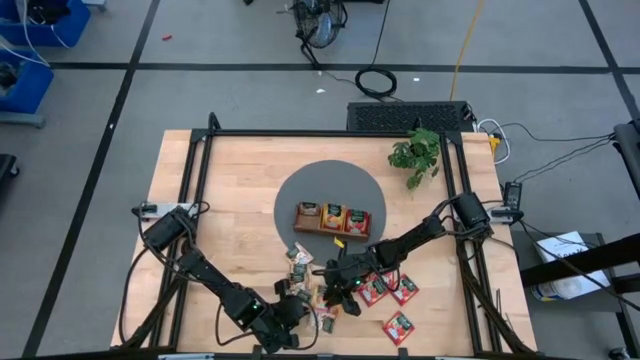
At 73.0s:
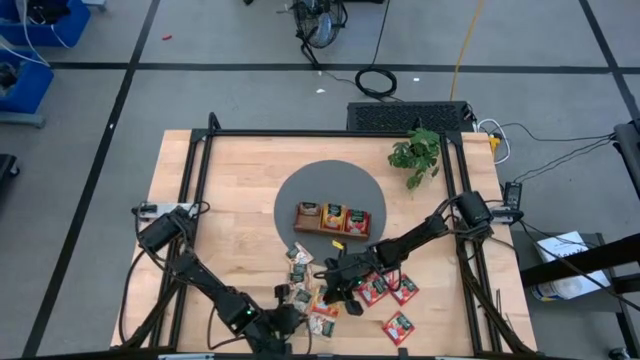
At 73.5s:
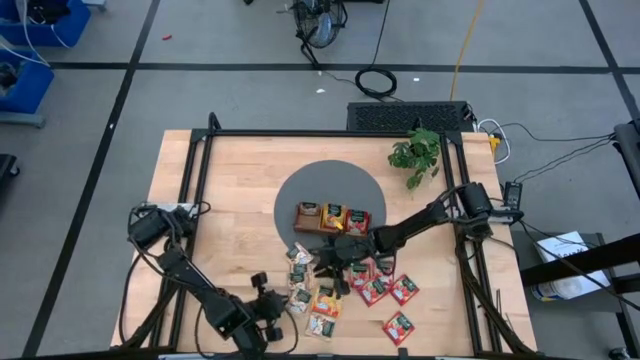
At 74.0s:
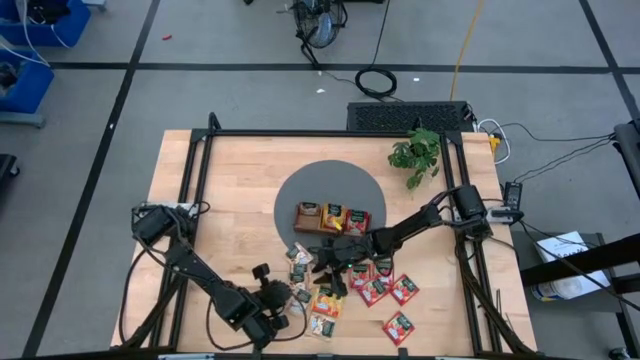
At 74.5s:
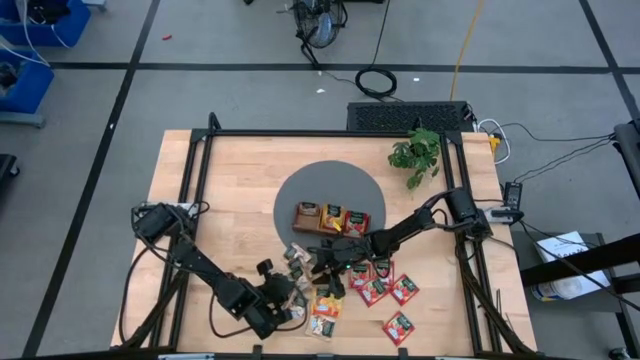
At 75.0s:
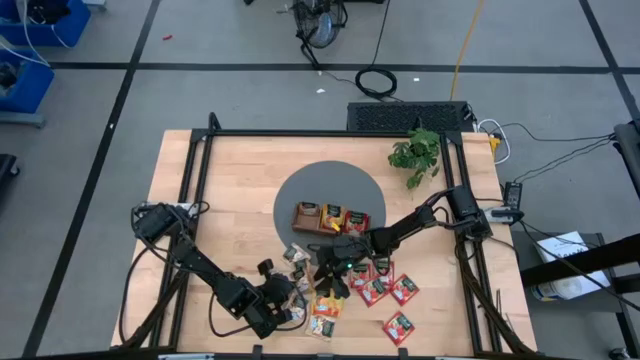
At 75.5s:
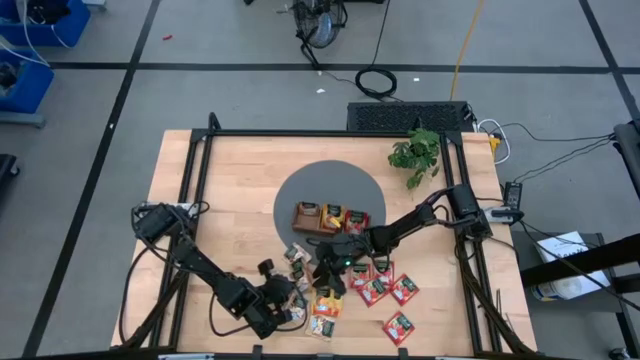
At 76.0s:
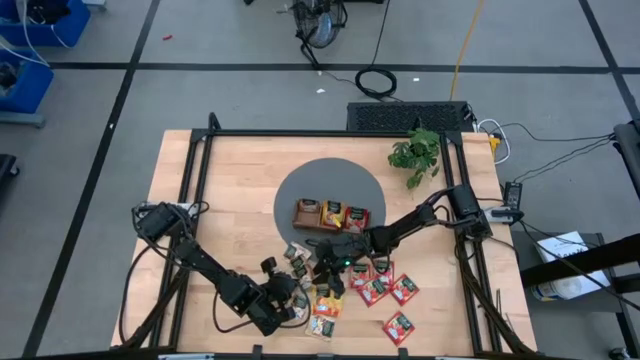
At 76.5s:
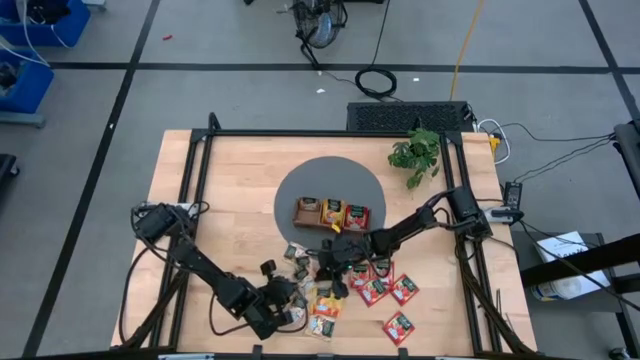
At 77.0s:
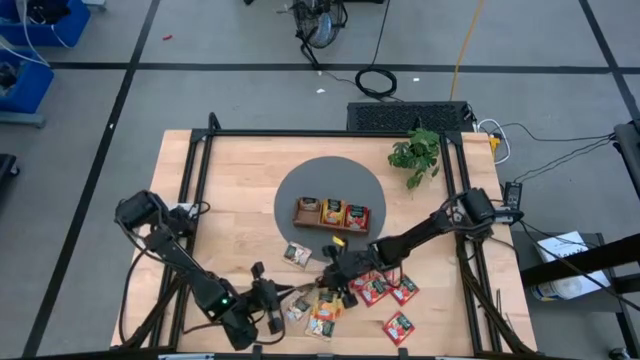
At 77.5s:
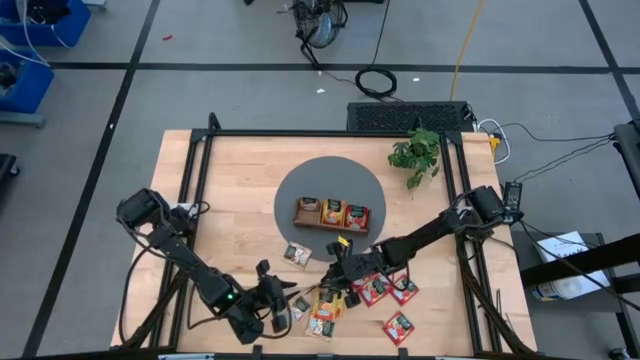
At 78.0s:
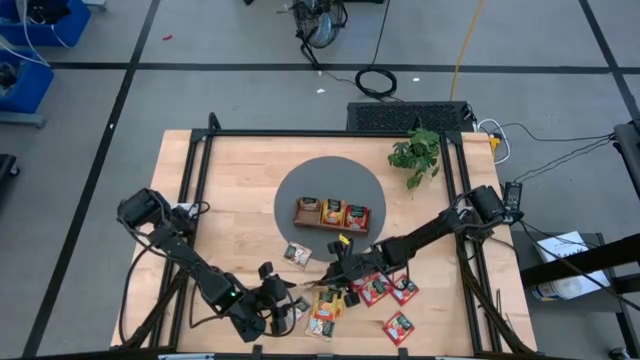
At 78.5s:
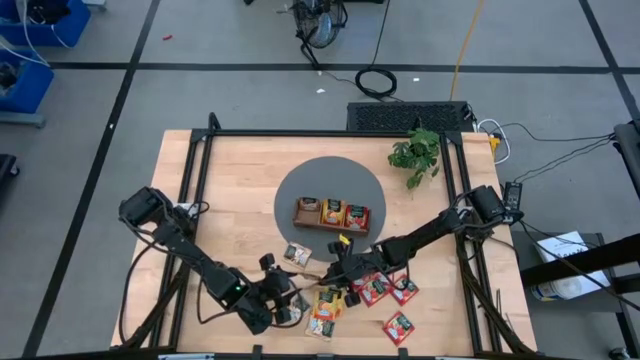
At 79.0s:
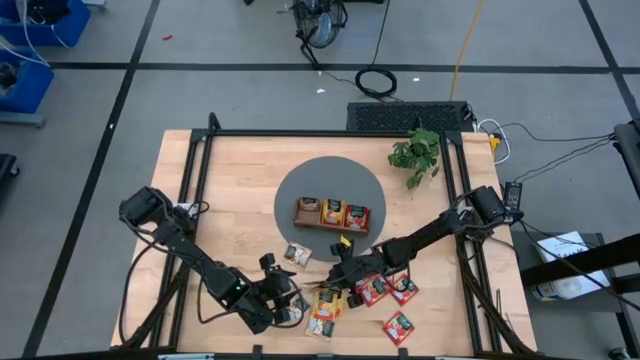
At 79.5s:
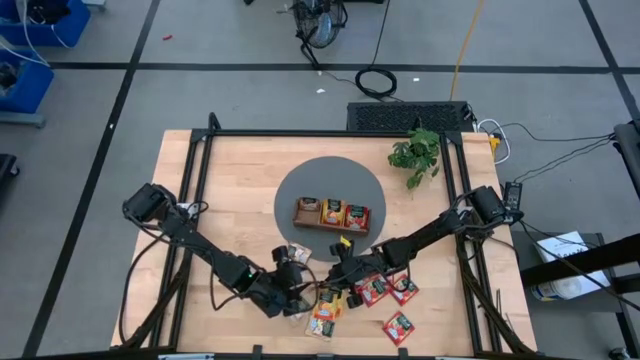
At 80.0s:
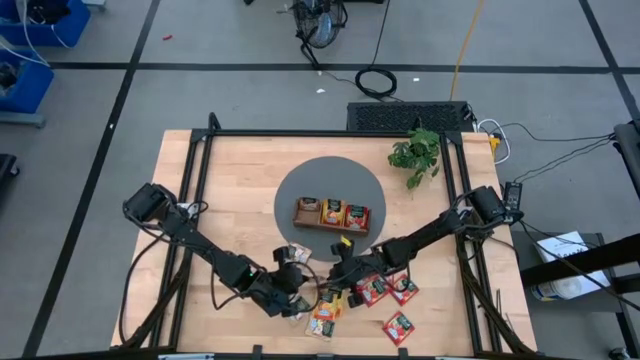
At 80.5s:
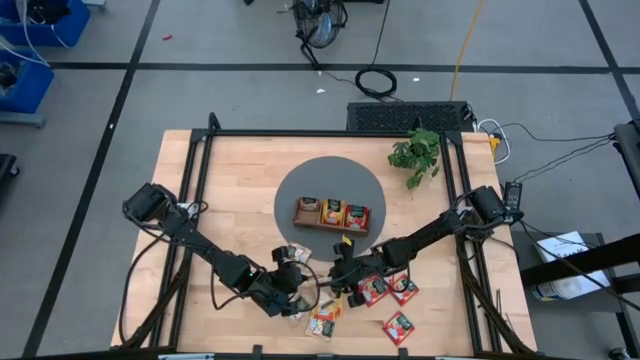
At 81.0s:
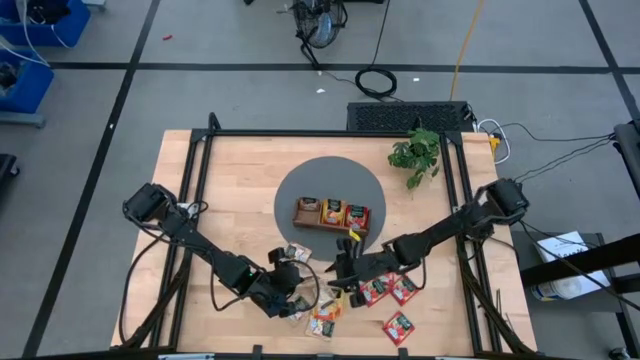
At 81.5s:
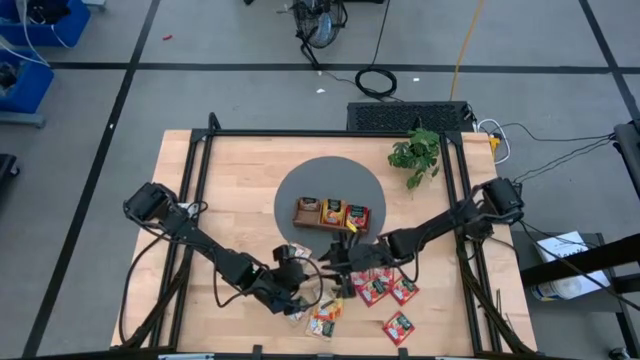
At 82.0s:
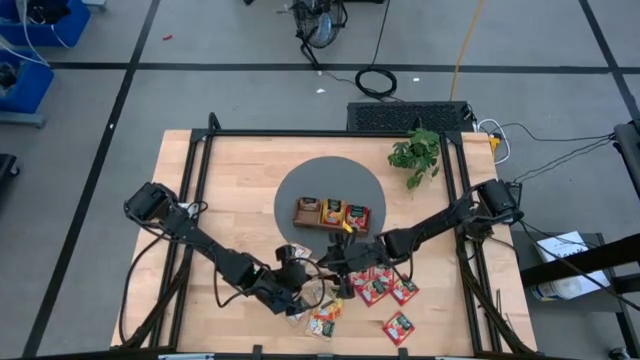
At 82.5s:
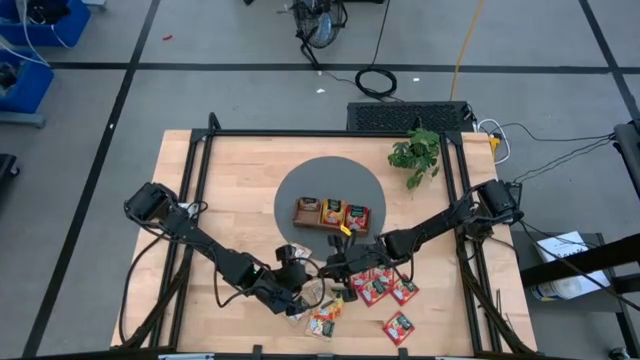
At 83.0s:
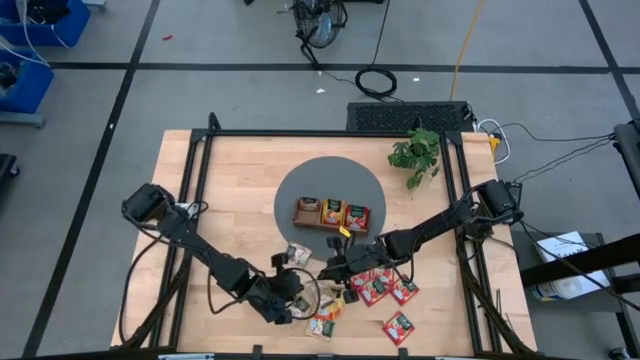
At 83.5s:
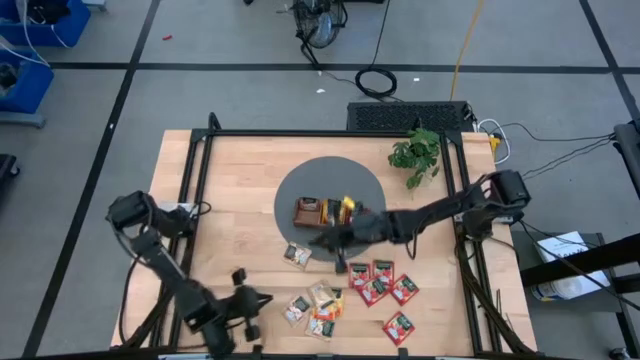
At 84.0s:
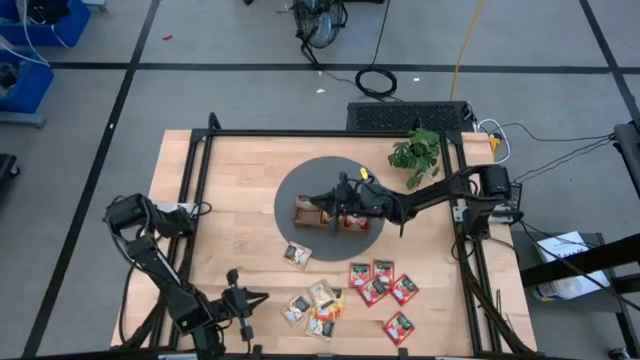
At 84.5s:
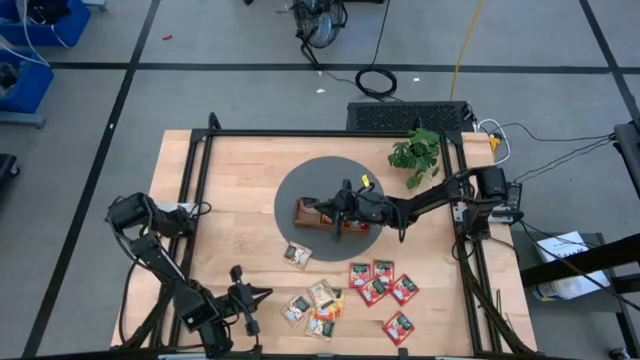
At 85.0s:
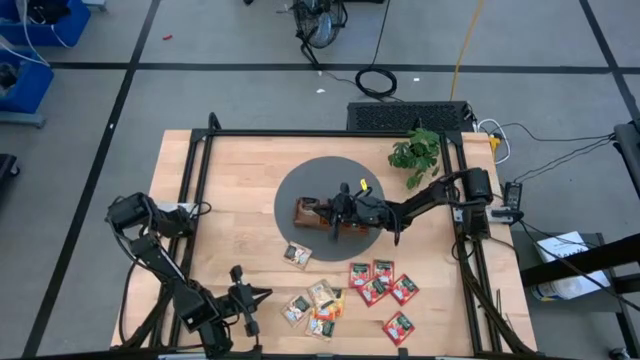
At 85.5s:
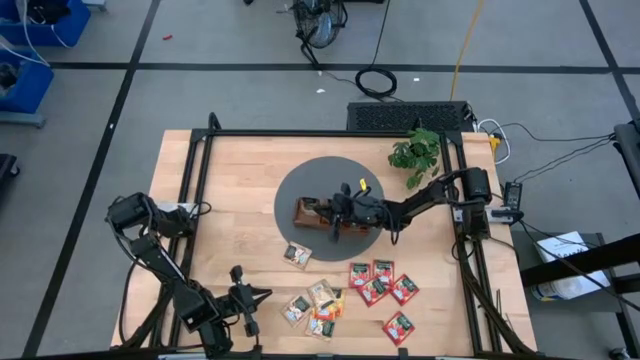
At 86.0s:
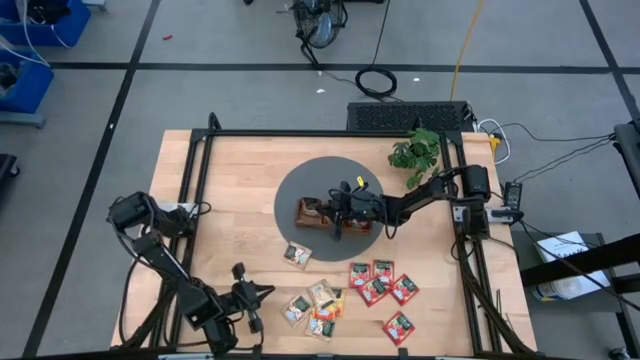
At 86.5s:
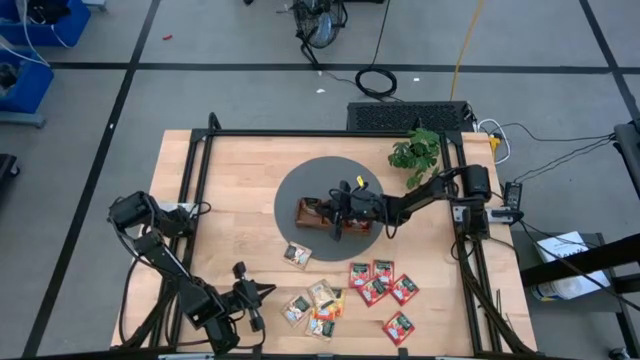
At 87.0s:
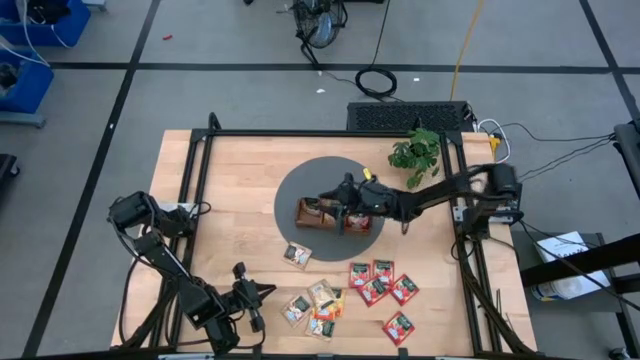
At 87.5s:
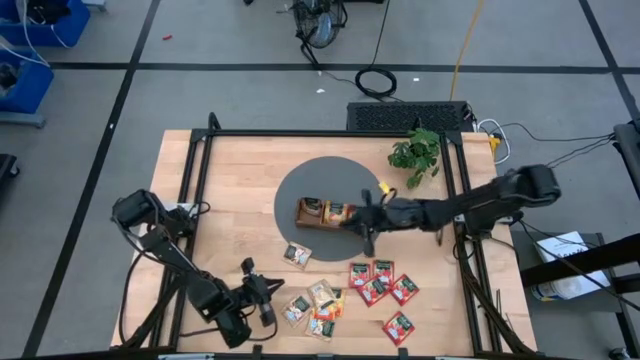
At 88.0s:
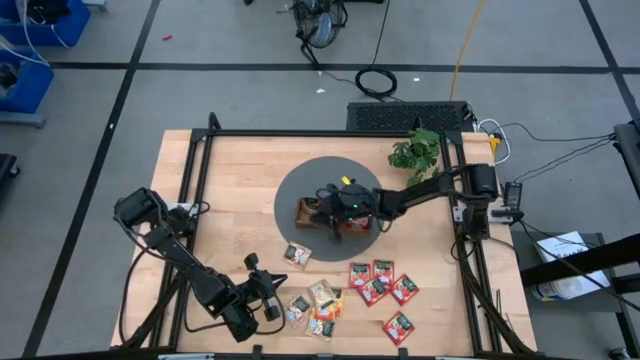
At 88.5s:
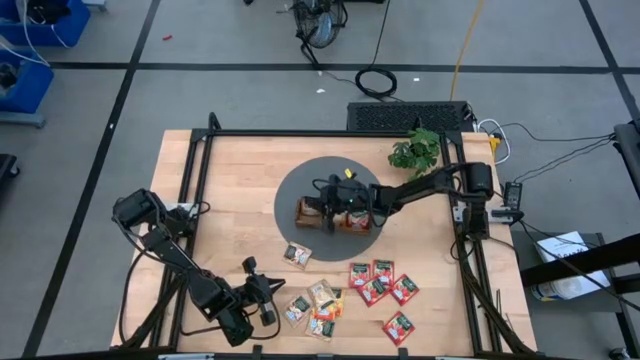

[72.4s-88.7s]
Task: Pick & Place Tea
Put the brown tea bag into the left section of the wooden organizer

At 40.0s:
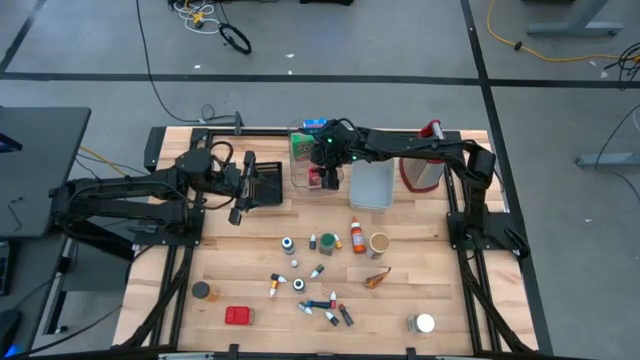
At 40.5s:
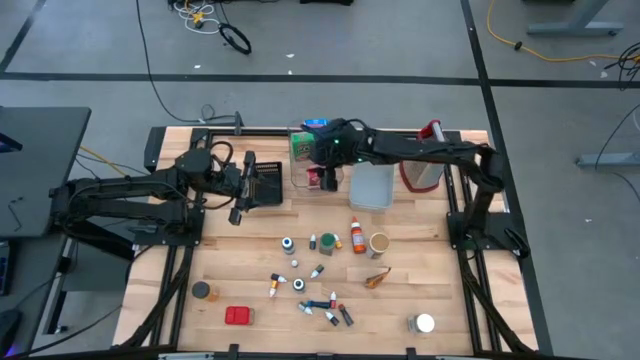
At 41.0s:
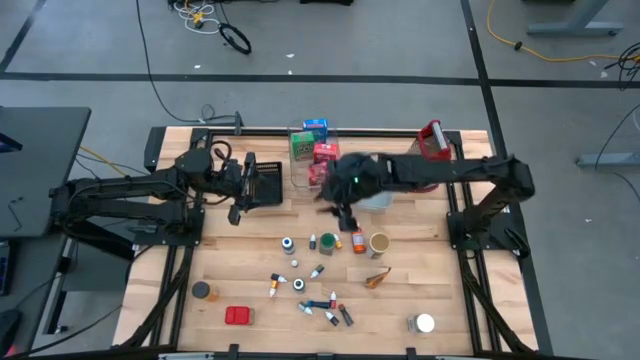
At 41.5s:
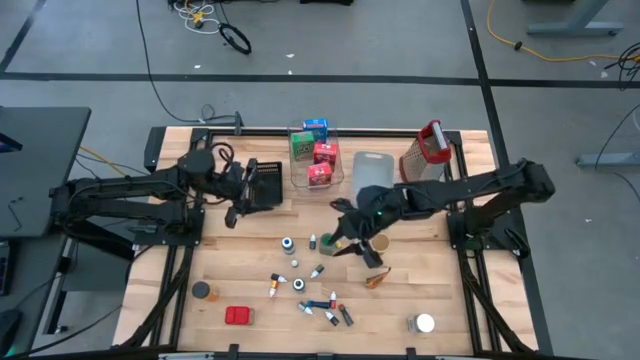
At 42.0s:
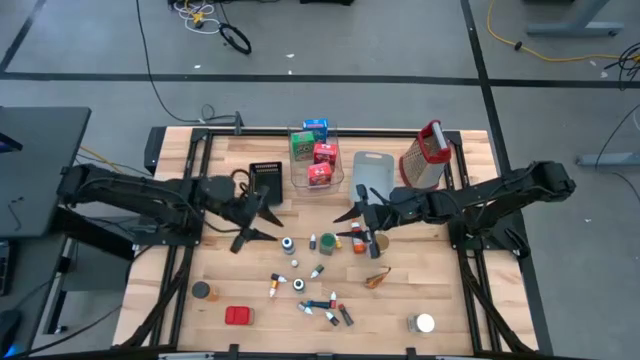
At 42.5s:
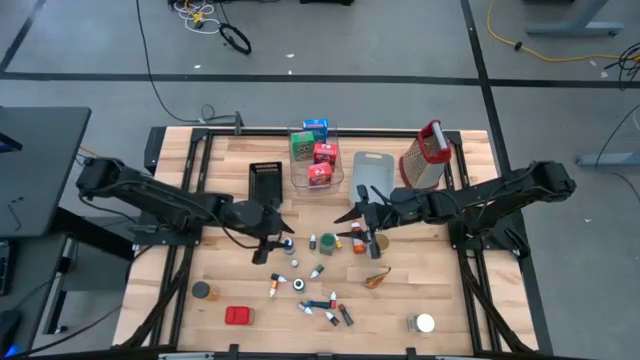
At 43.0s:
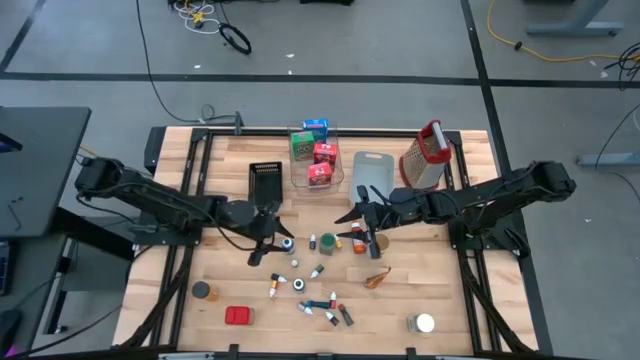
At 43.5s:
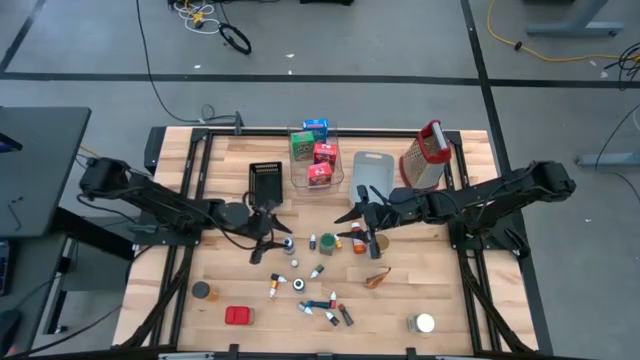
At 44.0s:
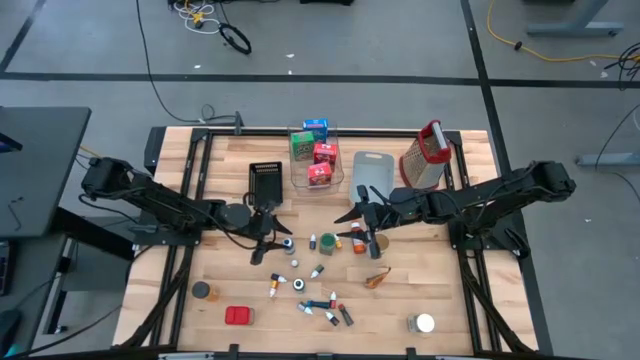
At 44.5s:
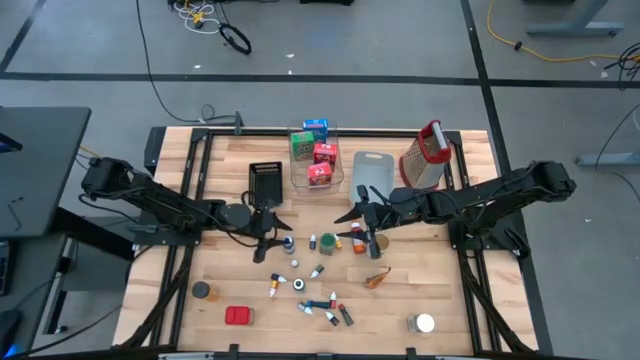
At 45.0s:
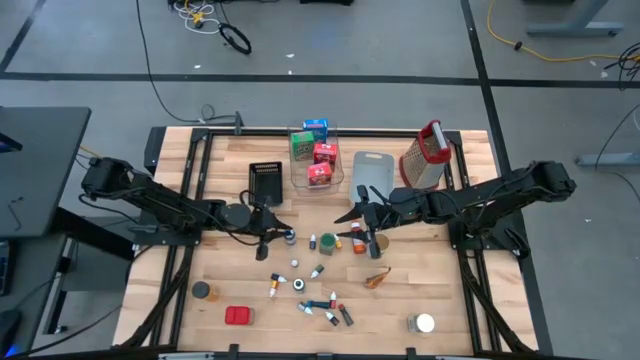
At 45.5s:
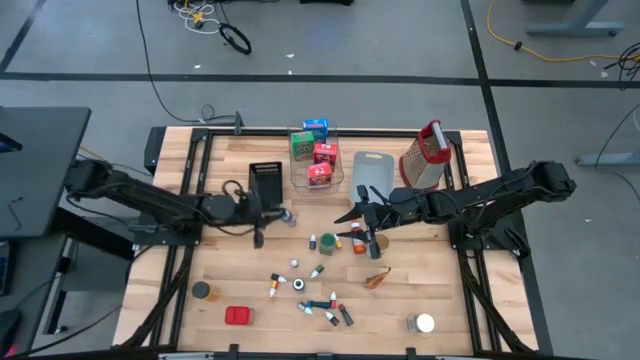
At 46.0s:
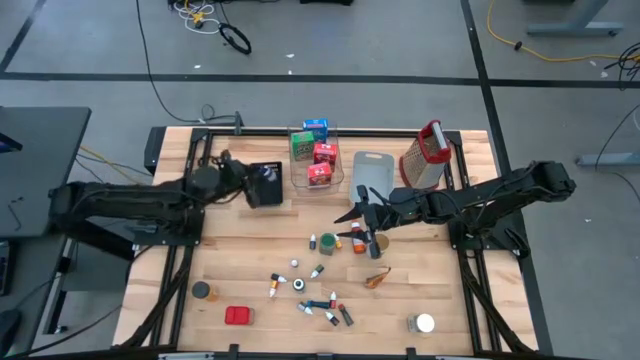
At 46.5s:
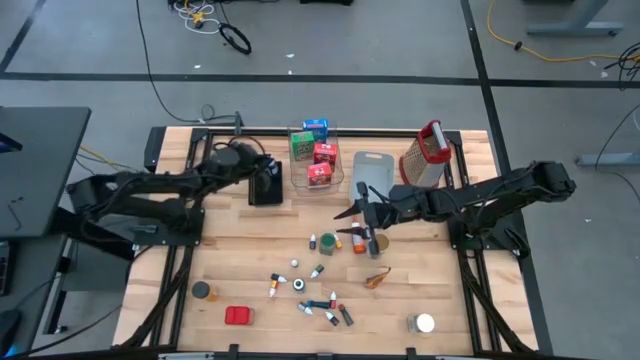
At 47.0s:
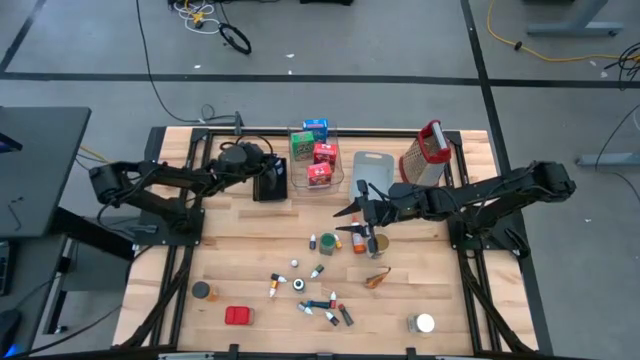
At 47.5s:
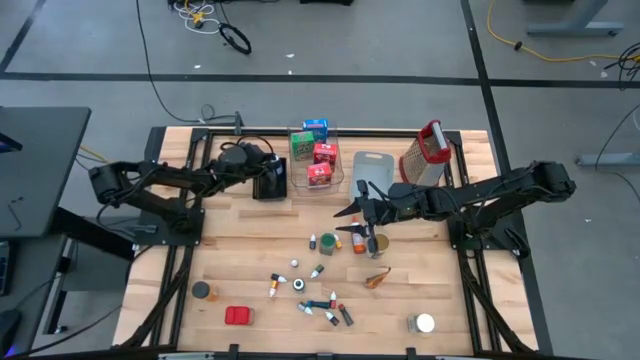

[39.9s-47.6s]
Task: Pick & Place Kitchen Items
Put the large blue food coloring bottle into the black bin
